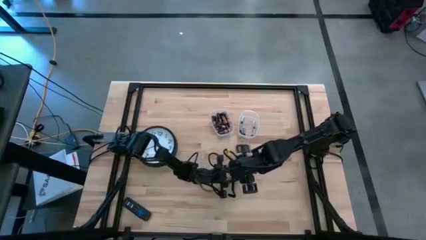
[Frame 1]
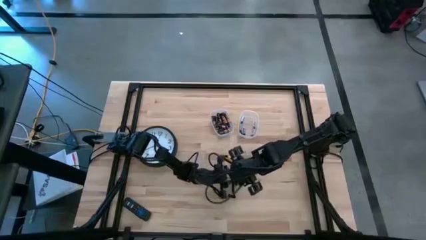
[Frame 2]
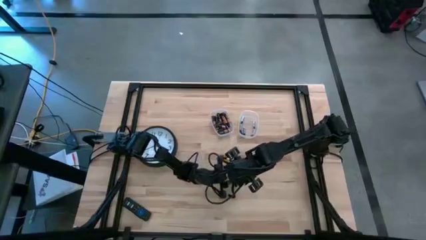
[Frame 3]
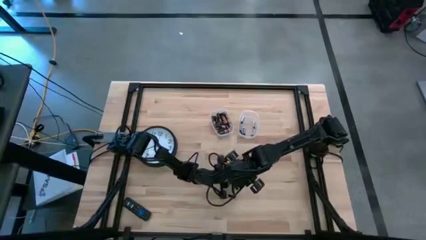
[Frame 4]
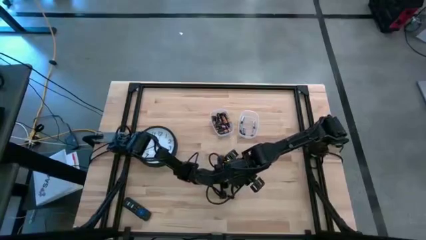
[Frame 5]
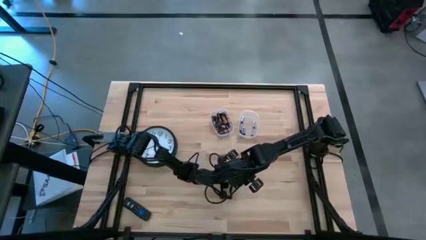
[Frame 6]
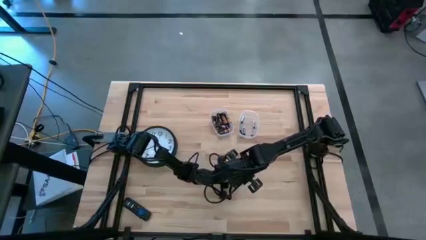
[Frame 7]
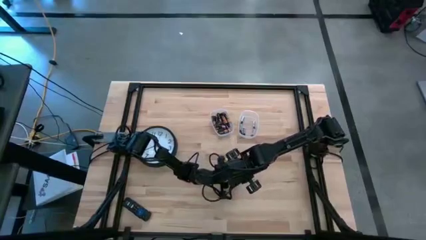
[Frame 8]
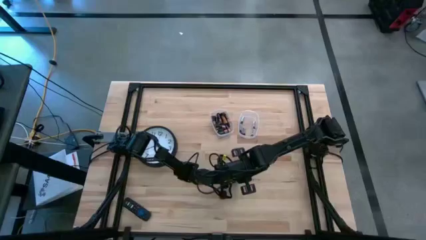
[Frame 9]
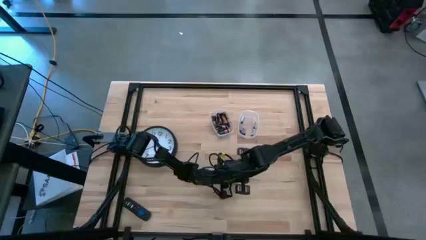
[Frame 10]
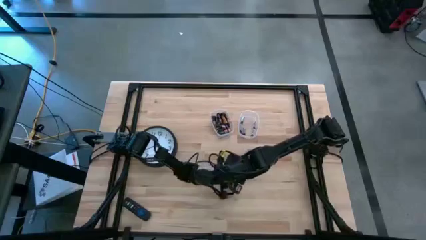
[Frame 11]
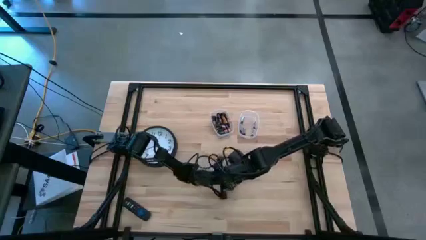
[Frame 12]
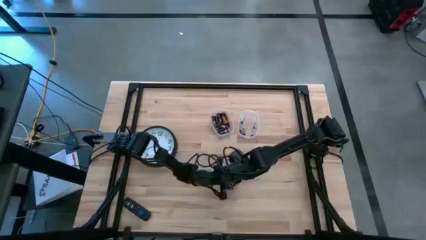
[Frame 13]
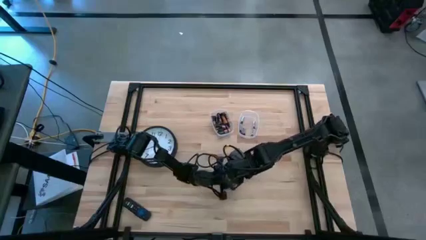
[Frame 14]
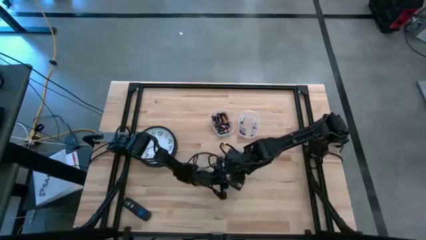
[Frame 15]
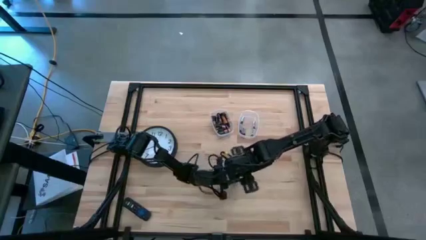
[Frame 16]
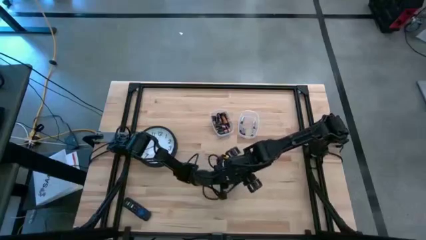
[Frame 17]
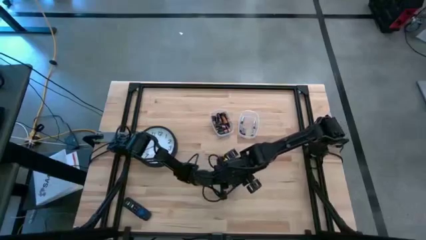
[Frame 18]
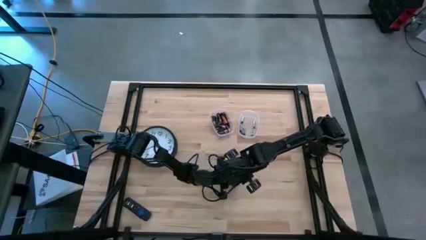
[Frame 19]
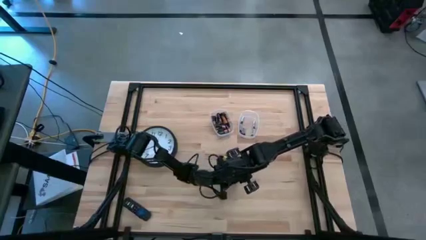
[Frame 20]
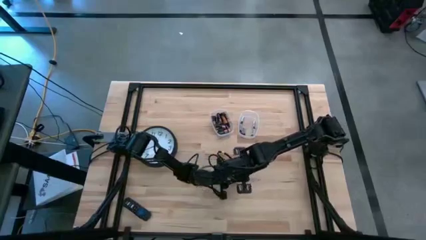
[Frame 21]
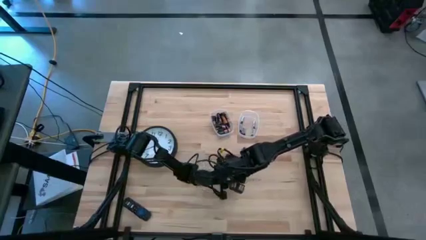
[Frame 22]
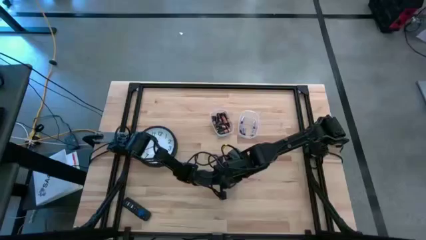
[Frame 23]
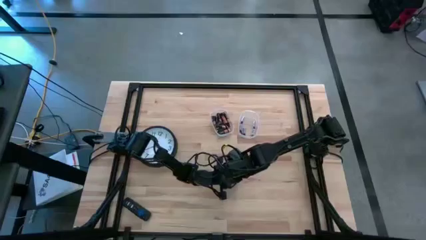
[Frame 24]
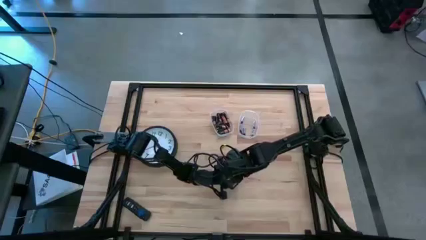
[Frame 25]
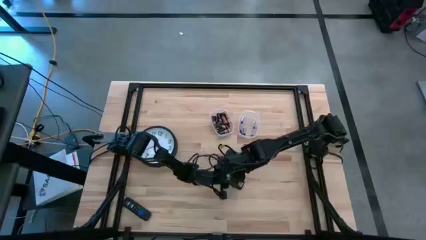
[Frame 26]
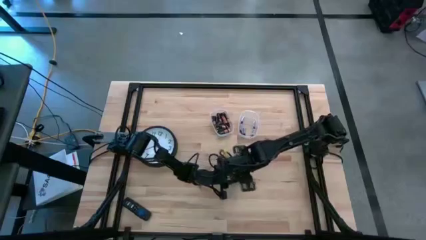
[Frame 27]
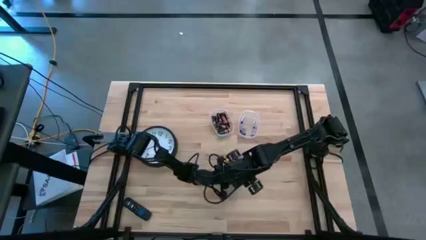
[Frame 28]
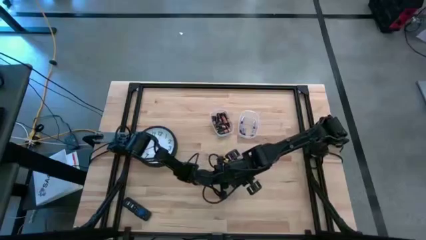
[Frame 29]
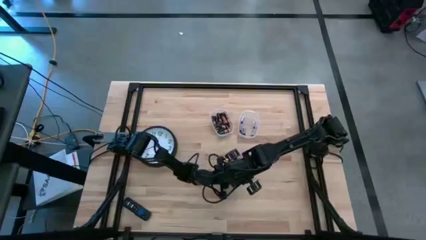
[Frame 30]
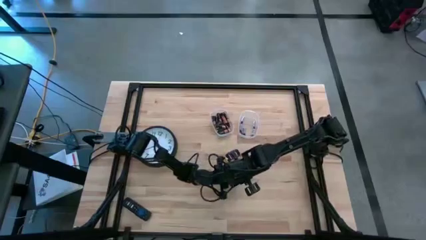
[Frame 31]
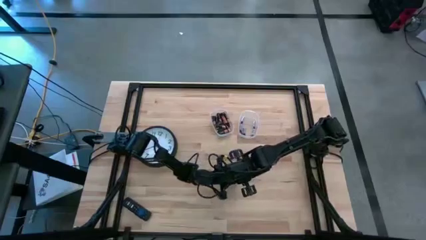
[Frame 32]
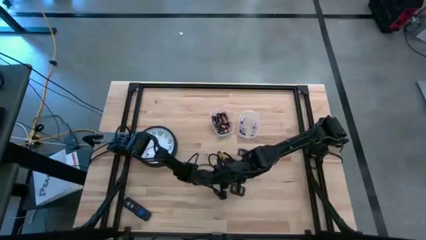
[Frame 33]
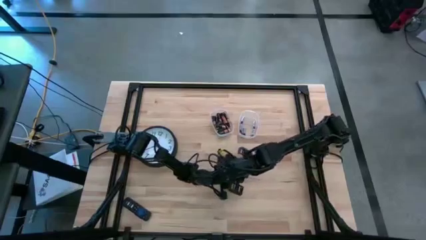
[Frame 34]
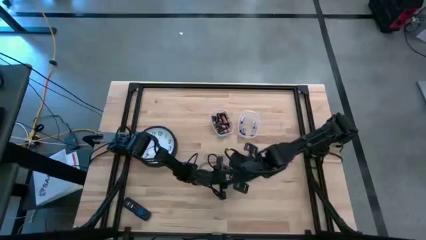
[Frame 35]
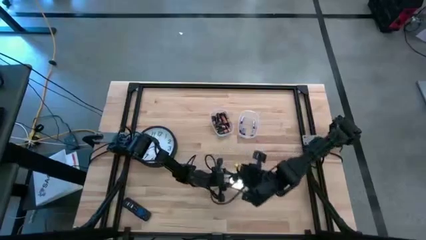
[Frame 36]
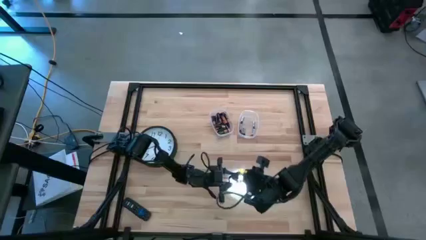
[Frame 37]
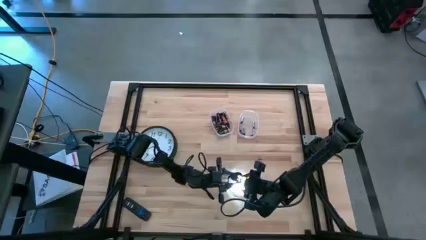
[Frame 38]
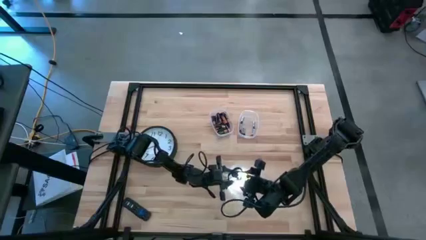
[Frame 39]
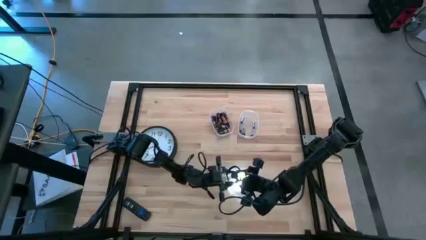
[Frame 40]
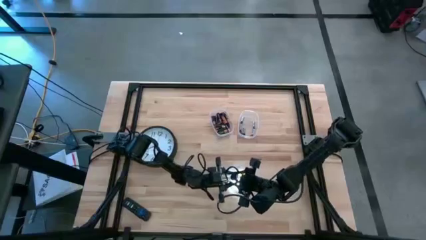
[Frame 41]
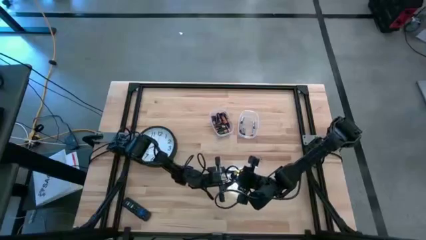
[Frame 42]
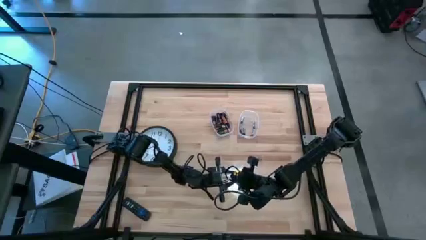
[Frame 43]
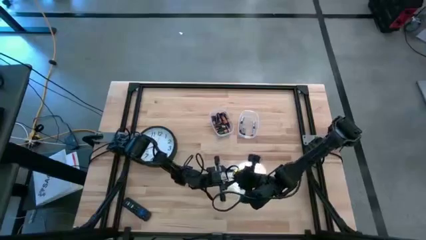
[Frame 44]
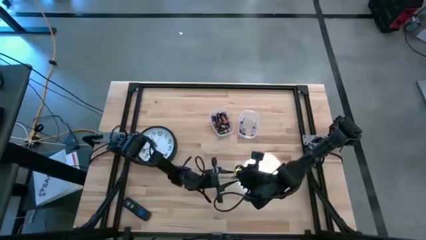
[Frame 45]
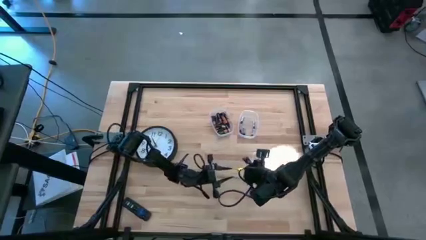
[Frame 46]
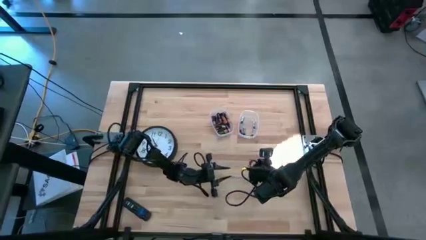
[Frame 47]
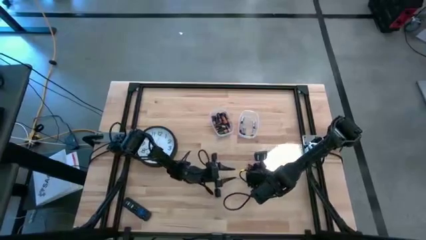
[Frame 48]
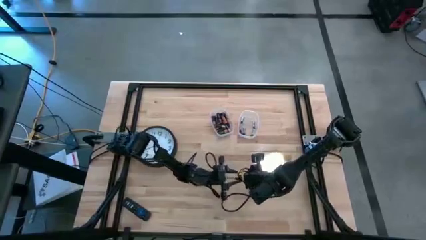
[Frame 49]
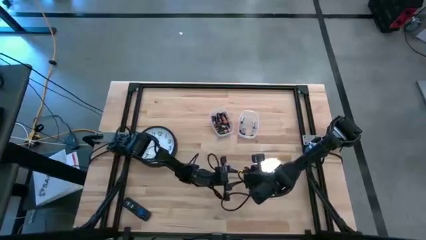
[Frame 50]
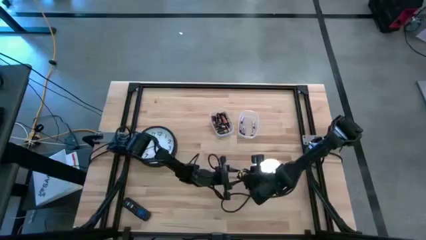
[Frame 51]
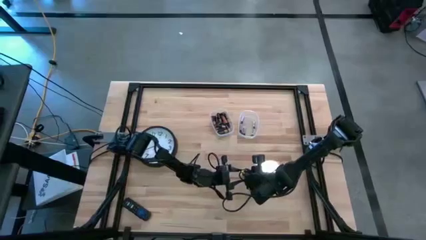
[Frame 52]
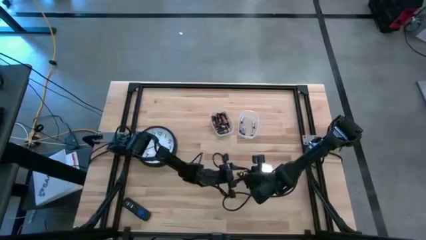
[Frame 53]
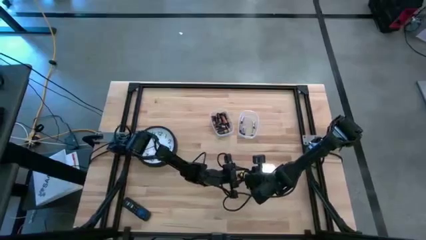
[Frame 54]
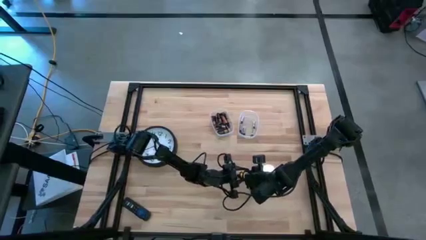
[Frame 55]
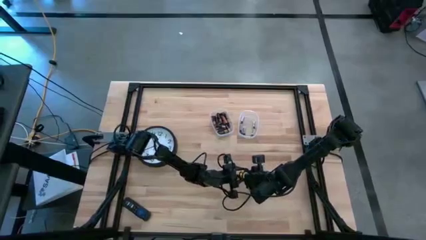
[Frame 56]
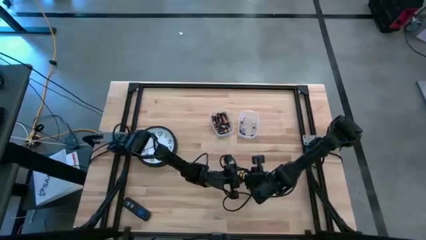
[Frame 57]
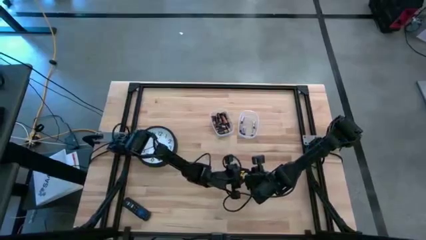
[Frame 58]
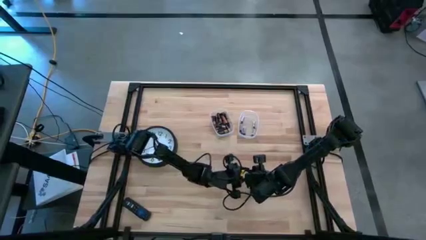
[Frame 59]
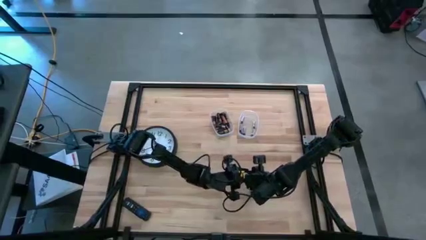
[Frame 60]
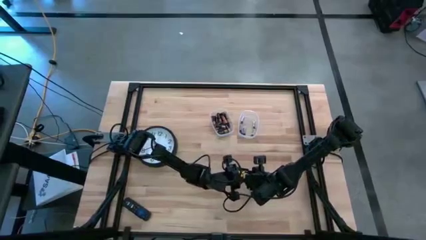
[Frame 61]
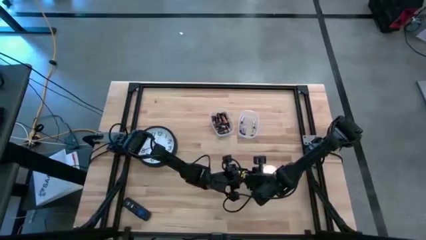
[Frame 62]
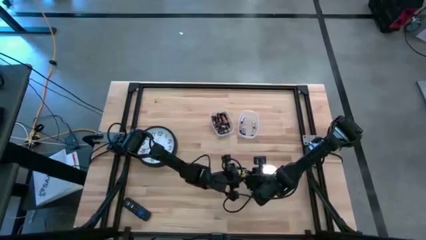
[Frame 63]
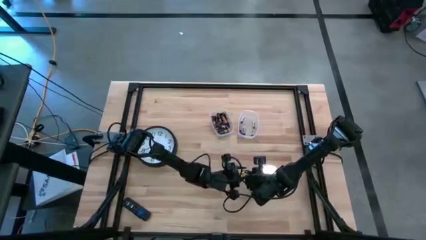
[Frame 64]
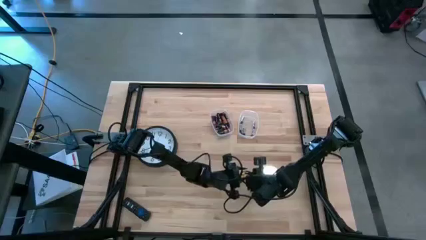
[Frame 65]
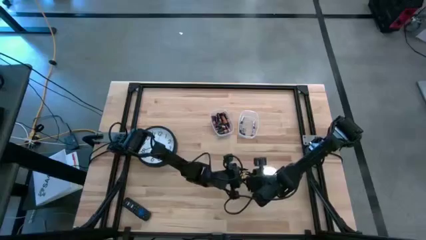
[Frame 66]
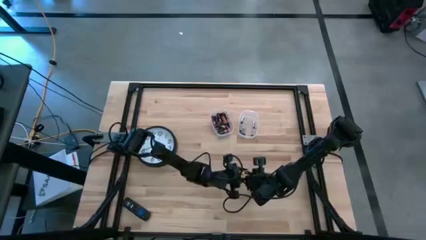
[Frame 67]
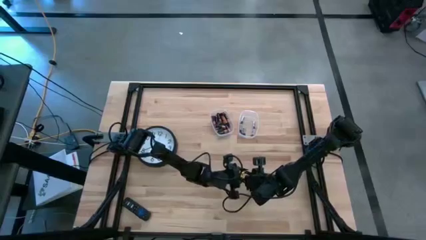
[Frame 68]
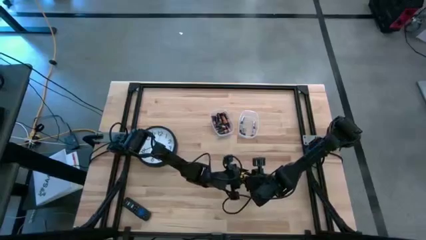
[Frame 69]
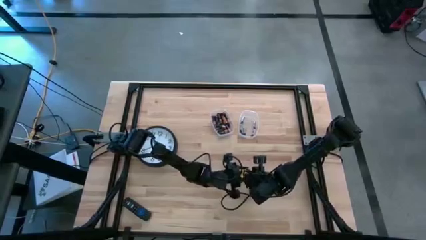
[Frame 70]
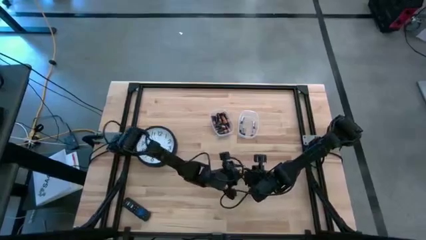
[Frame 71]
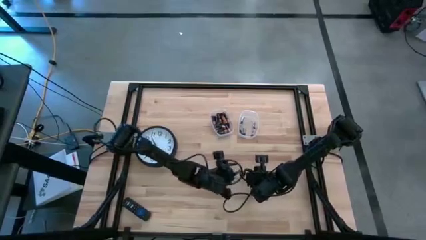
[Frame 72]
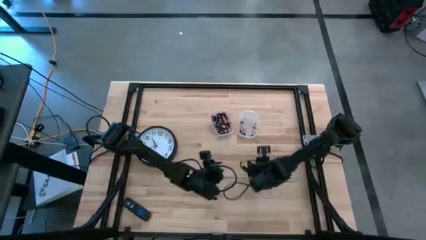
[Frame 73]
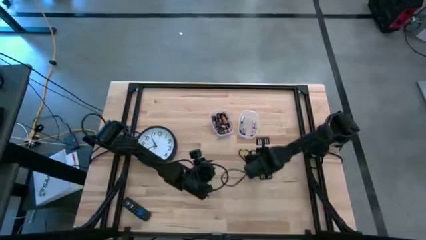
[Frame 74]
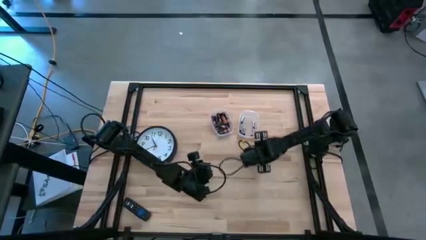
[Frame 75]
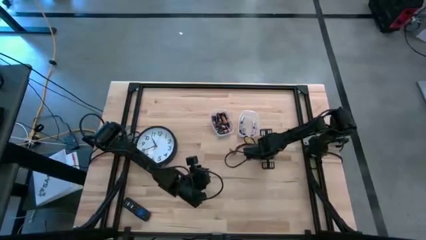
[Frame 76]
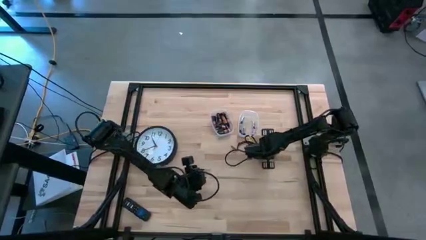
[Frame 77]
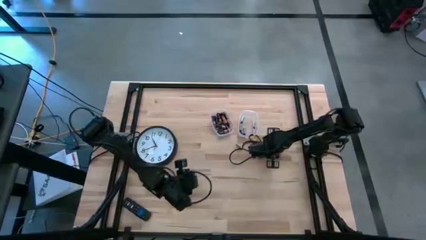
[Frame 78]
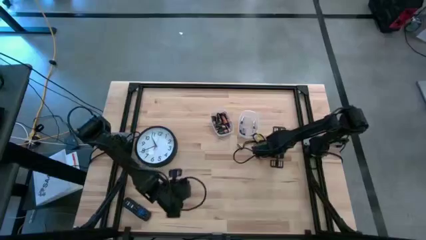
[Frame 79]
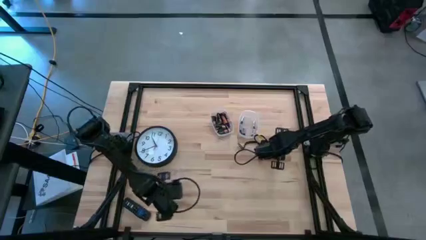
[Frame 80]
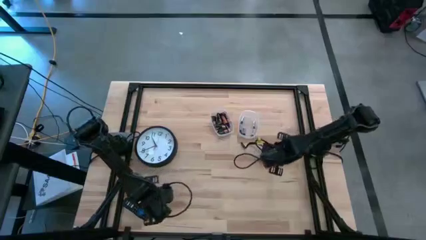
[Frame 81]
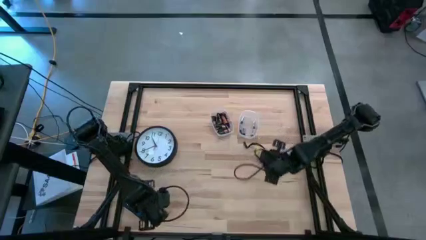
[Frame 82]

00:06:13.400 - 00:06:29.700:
Task: Insert battery
Close the lid of the black flashlight
